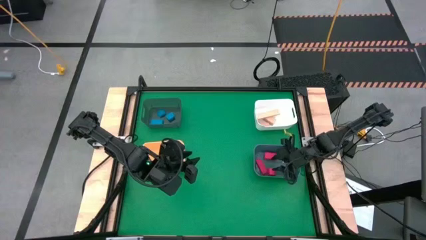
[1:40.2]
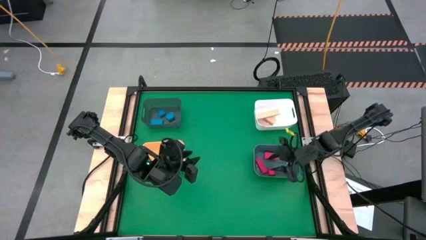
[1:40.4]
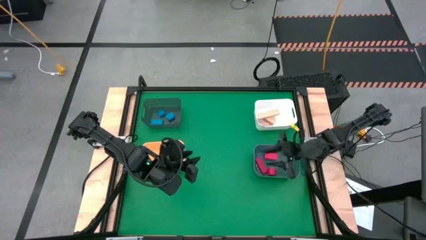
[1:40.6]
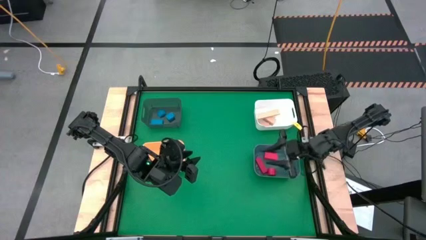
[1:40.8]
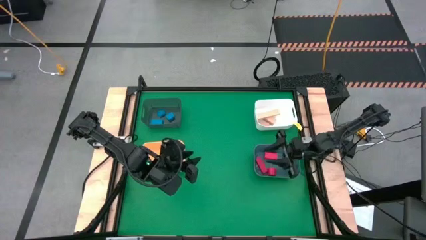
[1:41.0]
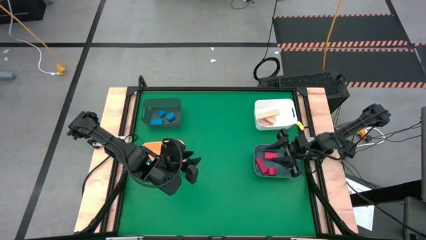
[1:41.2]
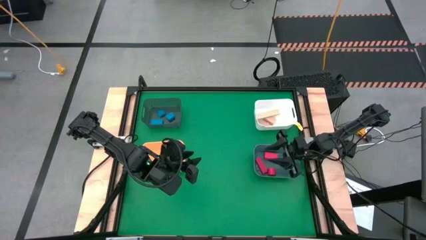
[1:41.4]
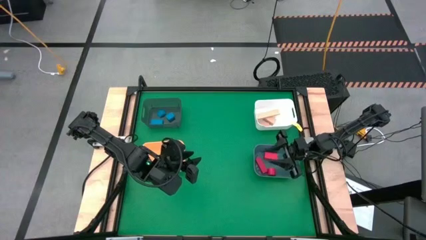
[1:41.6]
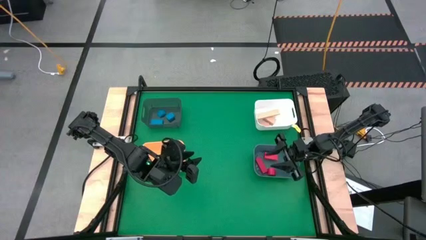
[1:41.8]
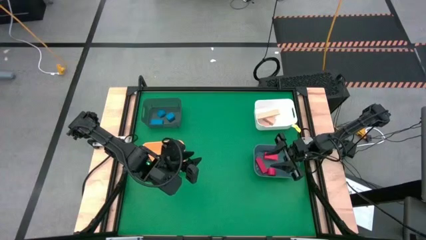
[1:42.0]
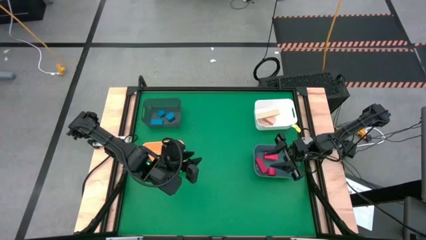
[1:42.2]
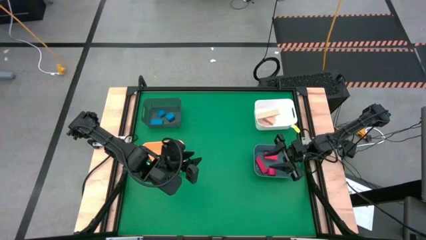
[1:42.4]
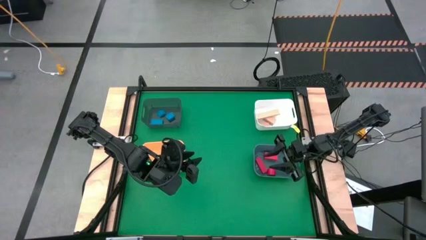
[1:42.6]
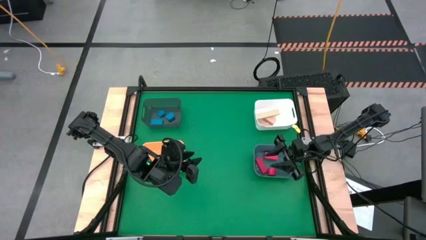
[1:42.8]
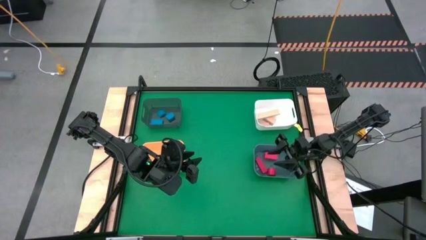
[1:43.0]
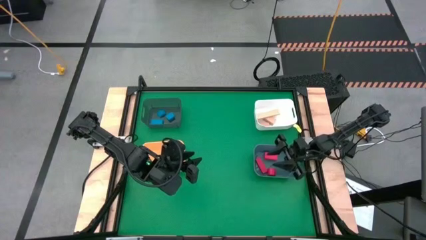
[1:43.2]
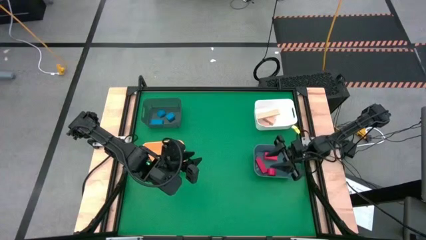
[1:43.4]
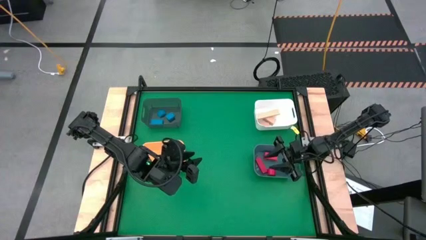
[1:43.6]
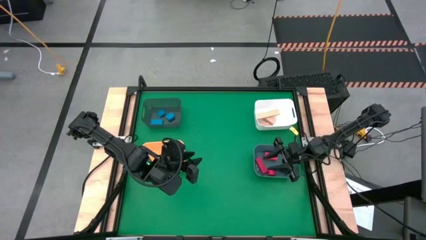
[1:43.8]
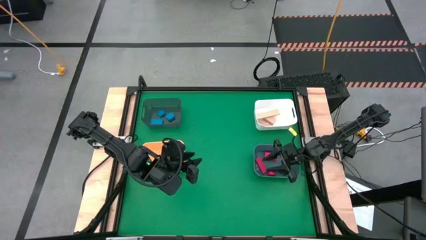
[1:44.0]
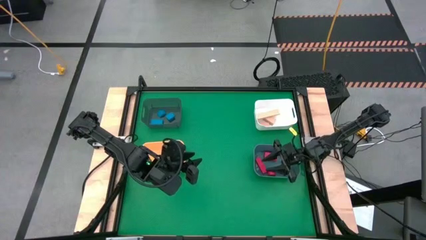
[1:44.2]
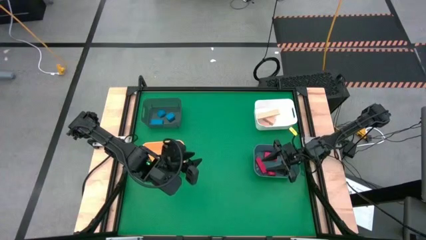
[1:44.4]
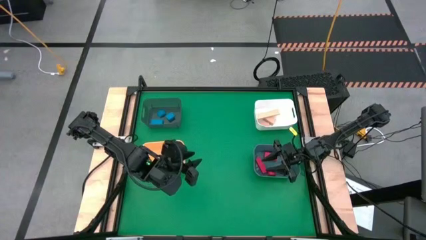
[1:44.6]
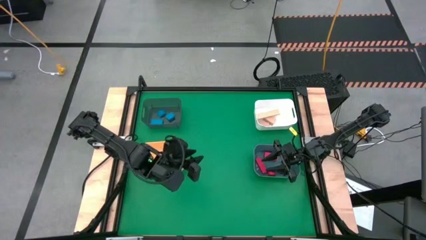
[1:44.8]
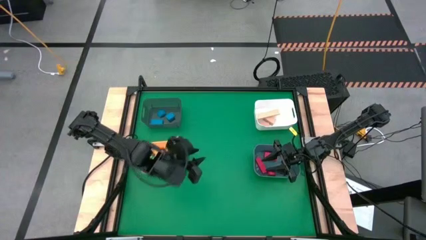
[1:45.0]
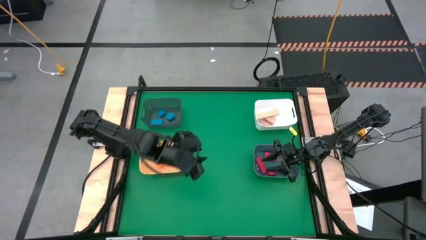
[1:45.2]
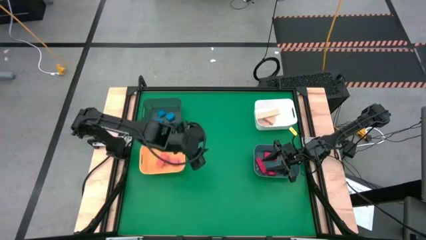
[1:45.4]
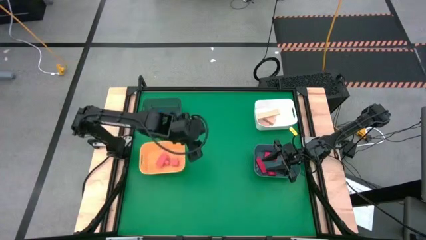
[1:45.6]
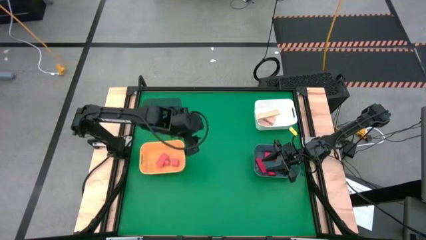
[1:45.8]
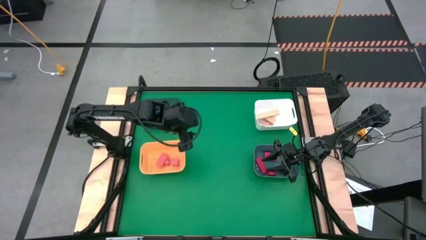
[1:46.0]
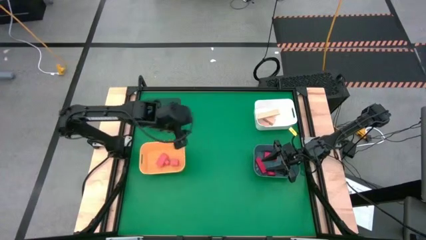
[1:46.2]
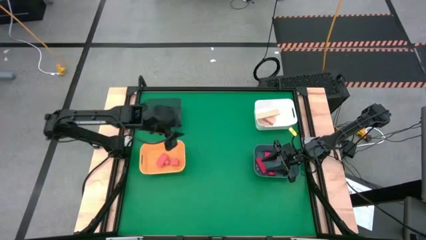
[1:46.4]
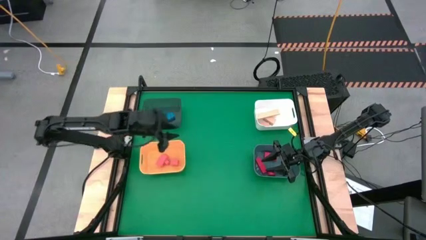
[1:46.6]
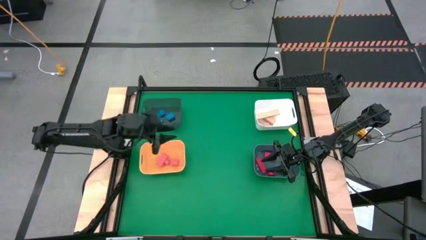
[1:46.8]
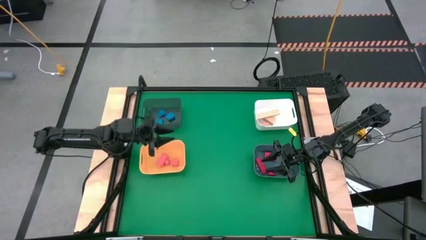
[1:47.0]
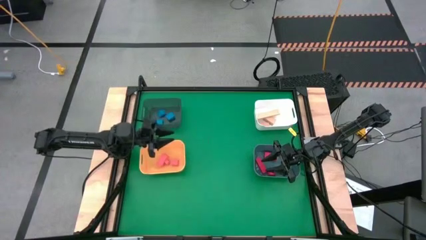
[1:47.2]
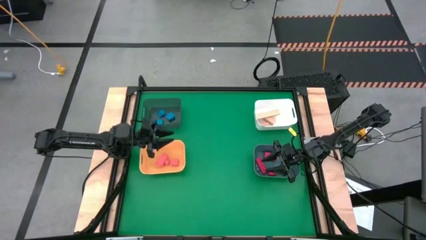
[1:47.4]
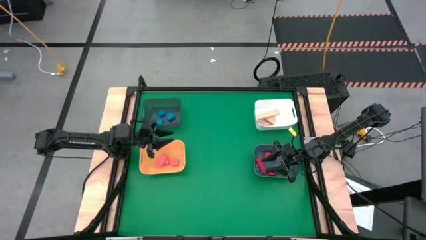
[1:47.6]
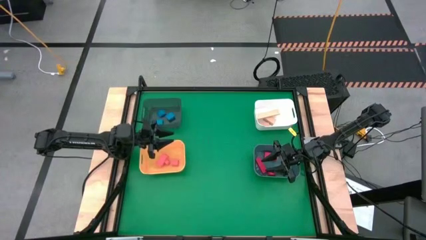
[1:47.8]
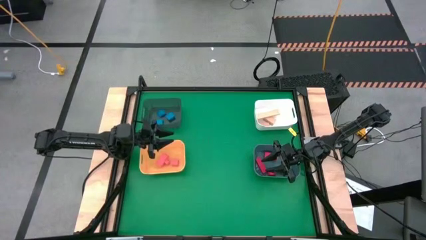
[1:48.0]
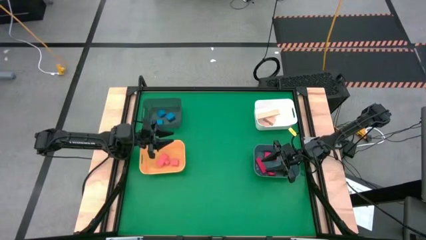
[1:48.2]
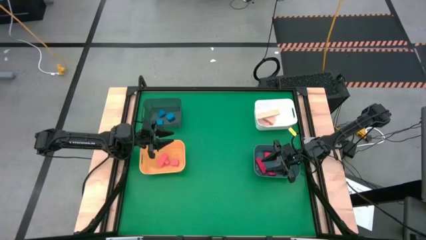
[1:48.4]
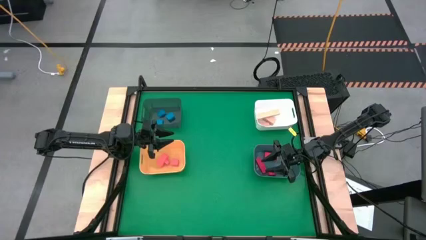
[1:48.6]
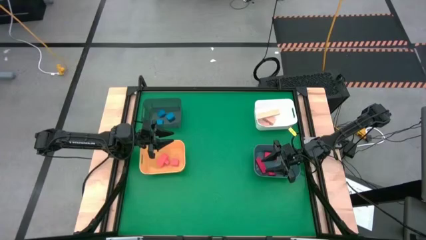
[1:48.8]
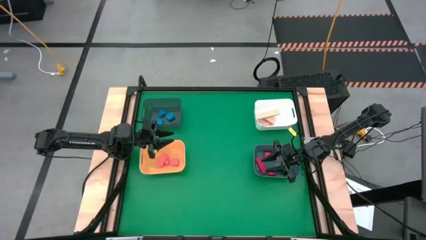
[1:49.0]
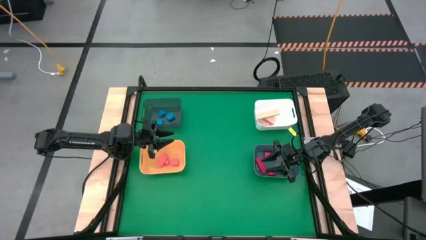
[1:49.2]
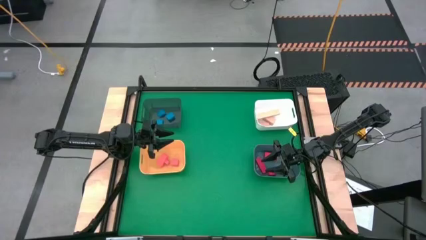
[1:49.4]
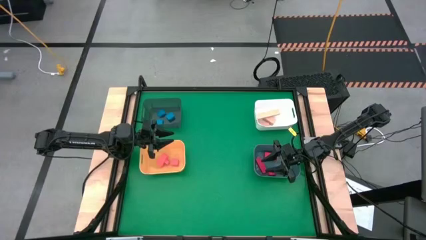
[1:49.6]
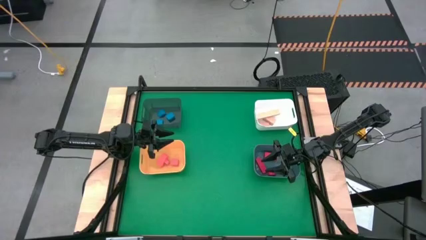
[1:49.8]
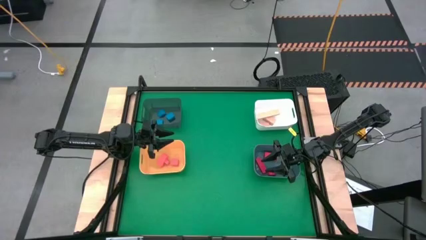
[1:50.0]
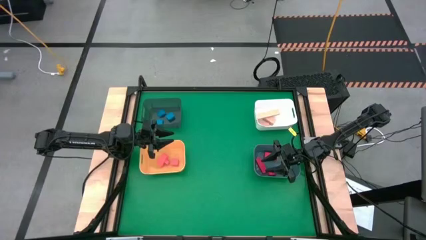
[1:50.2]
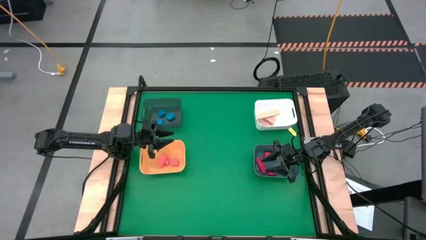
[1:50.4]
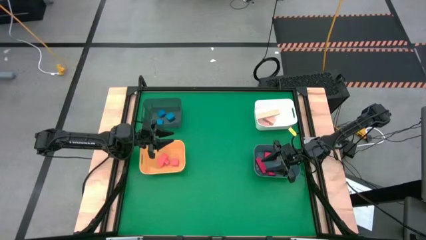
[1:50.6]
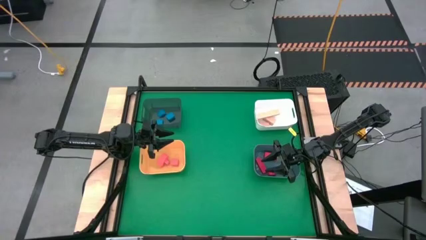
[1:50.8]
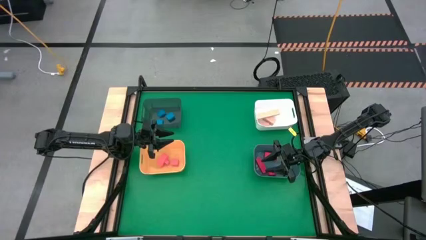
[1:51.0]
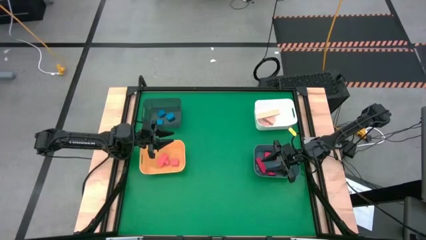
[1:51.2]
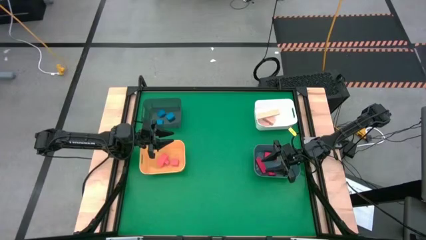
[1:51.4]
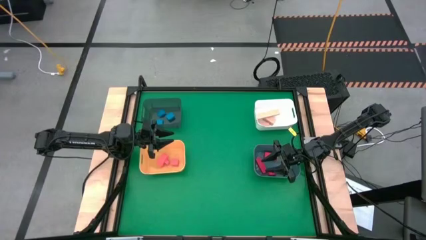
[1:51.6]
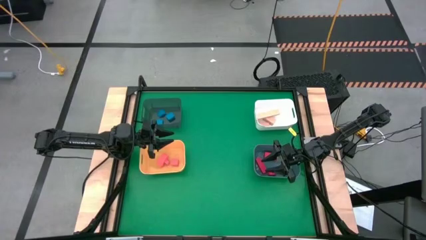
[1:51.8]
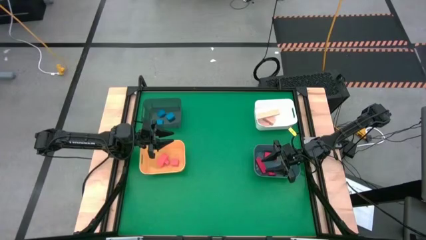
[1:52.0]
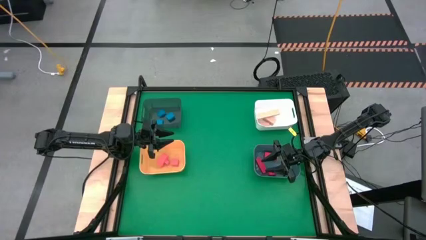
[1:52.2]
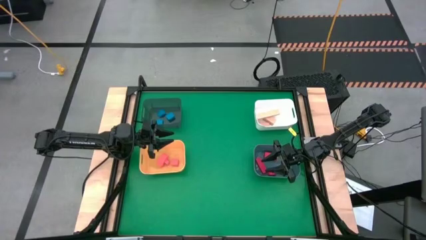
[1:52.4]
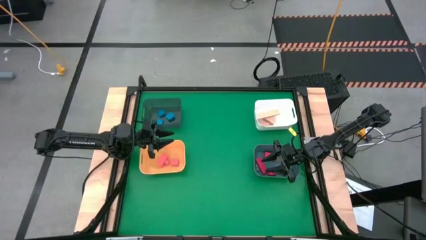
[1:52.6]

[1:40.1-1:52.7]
Task: Sort & place blocks by color
Return to Home Position

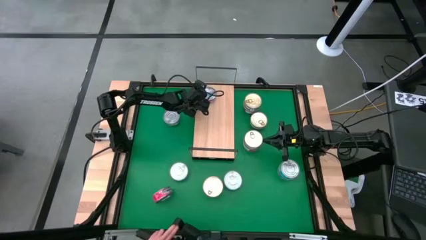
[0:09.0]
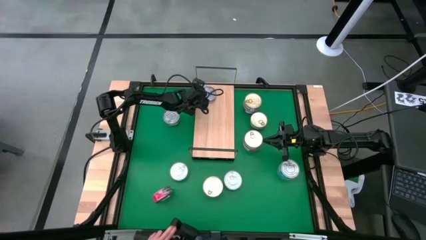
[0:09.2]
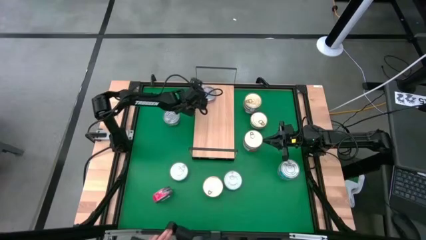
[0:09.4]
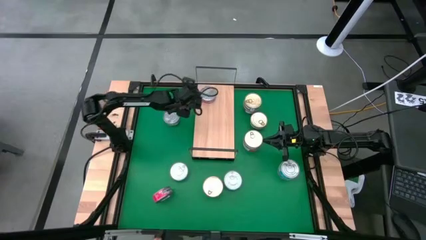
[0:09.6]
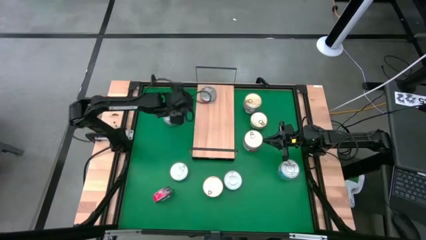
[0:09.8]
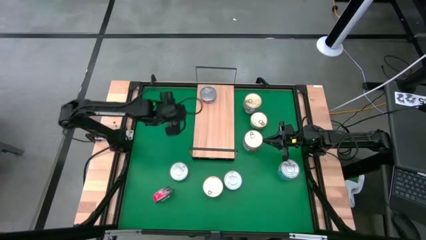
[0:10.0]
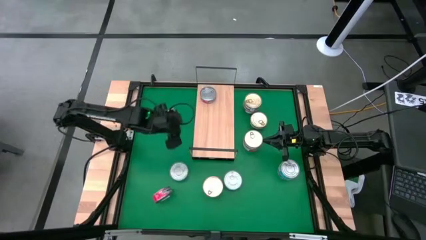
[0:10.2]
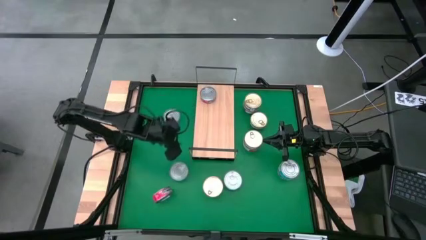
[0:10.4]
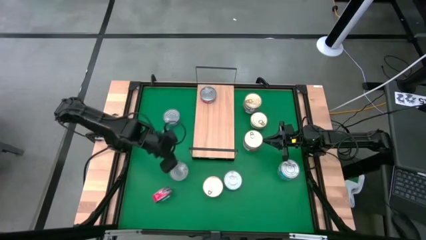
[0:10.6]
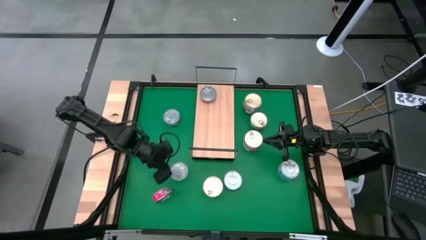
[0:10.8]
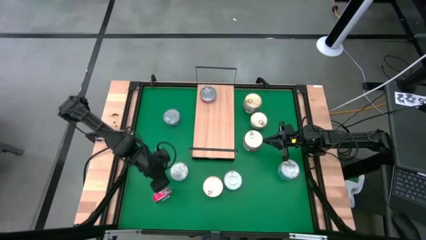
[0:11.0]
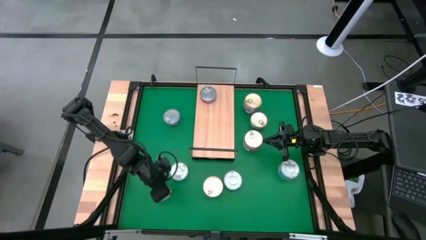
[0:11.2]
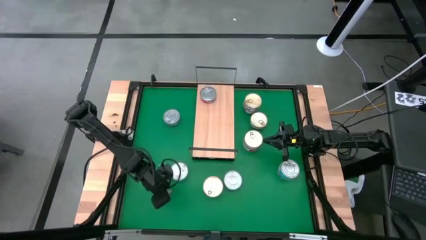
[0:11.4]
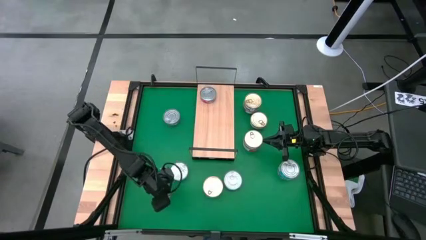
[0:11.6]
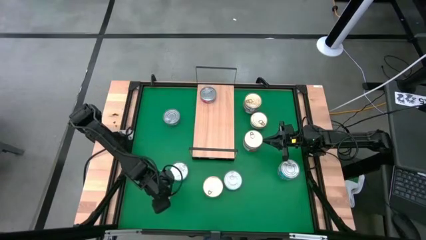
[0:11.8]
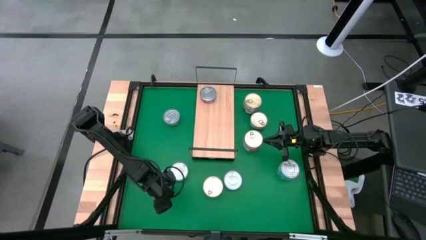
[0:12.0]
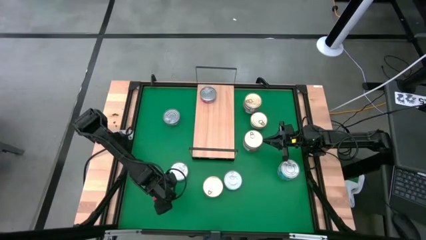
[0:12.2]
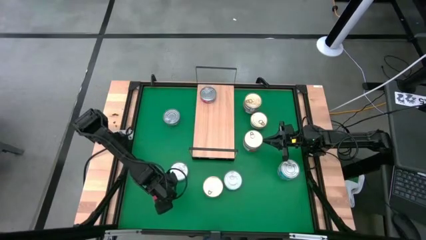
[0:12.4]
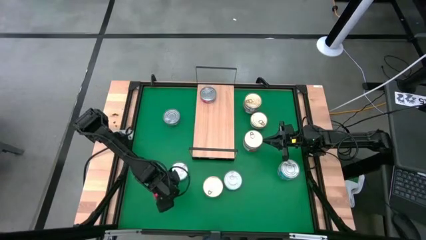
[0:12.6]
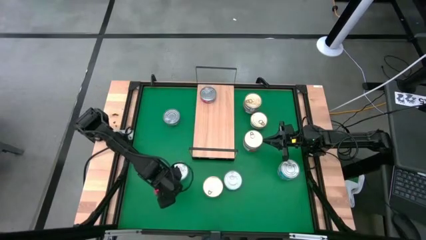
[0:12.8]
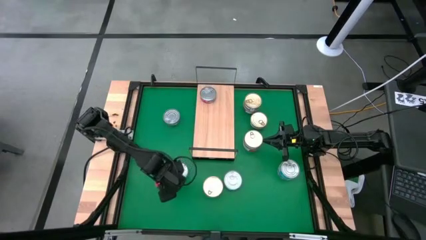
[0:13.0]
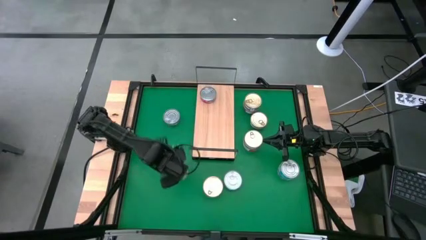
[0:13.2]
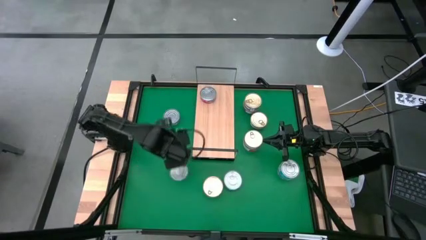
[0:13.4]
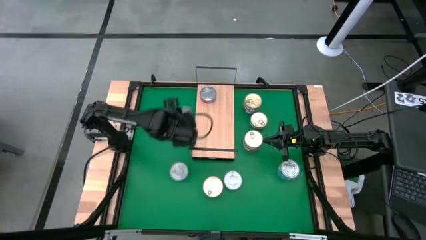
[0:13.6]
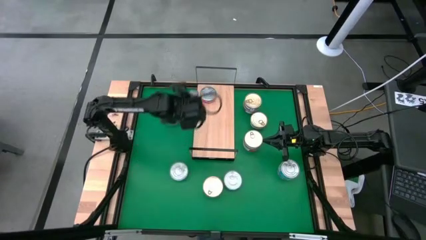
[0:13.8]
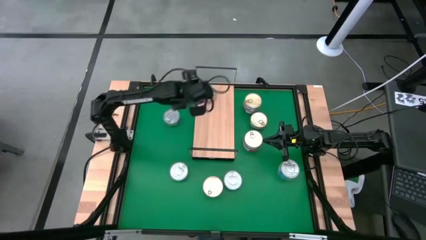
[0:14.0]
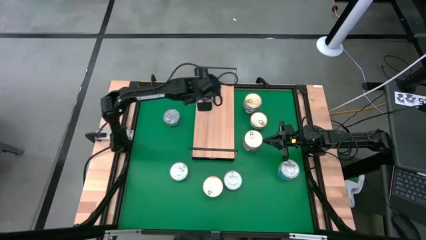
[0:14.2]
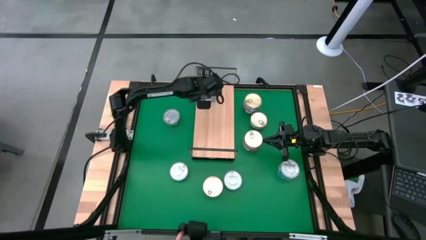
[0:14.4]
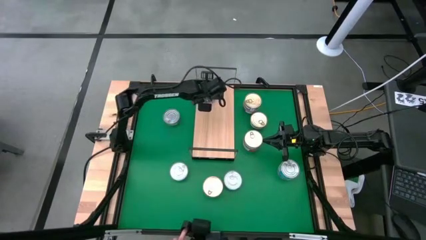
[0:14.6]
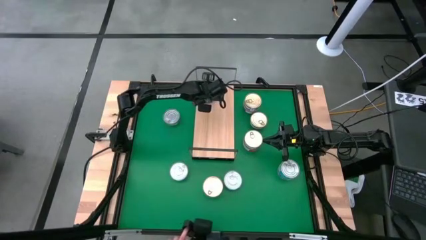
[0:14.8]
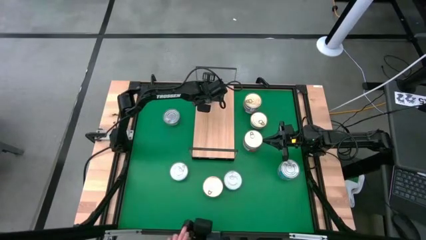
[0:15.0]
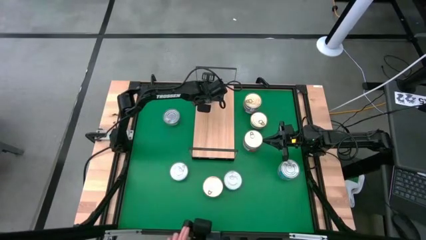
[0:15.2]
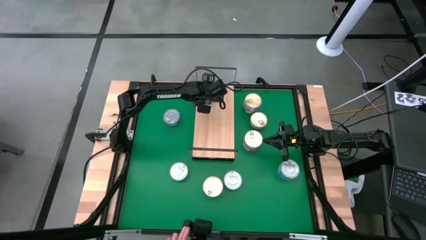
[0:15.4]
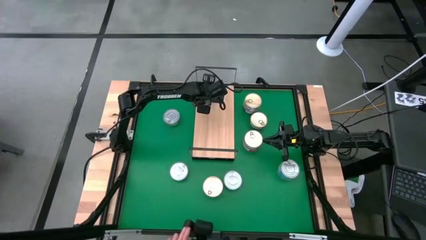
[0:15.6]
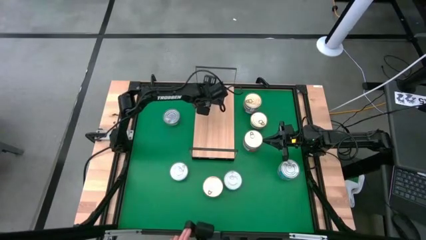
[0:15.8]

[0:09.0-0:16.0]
Task: Stack canned seafood by type on shelf
Stack the red tuna can on top of the red tuna can on the shelf
